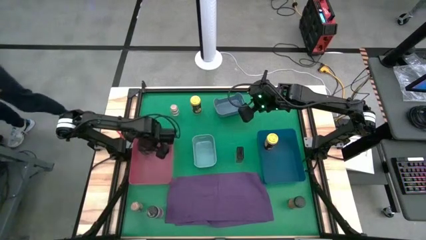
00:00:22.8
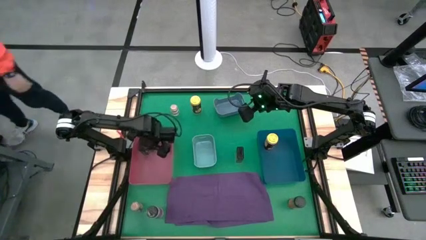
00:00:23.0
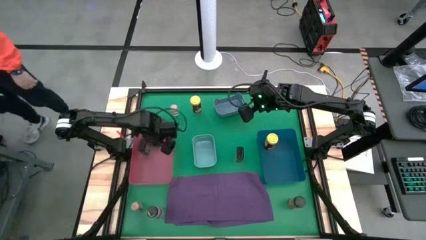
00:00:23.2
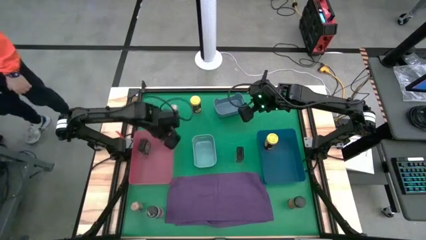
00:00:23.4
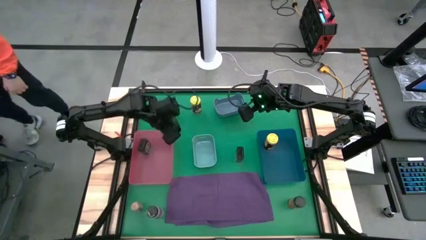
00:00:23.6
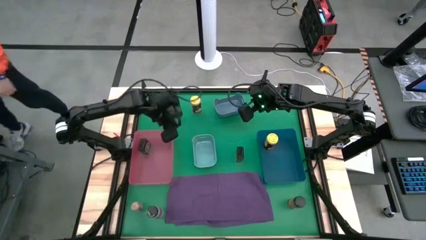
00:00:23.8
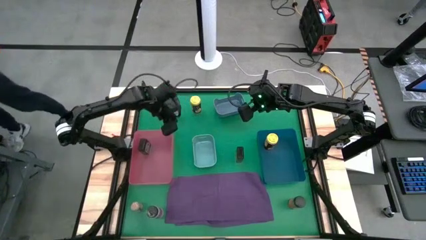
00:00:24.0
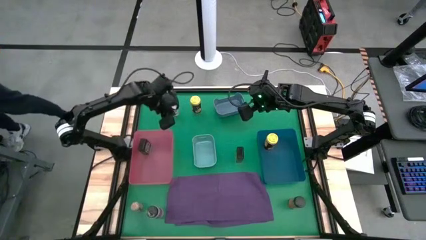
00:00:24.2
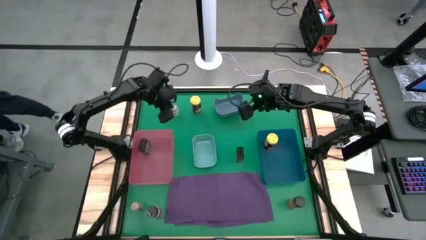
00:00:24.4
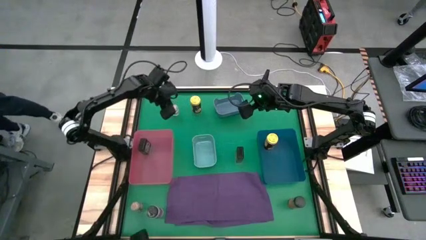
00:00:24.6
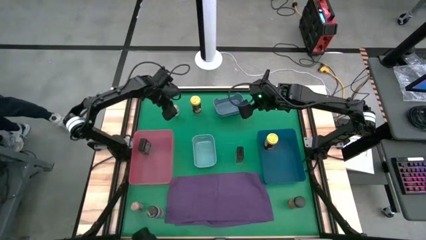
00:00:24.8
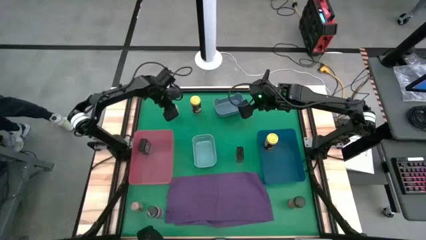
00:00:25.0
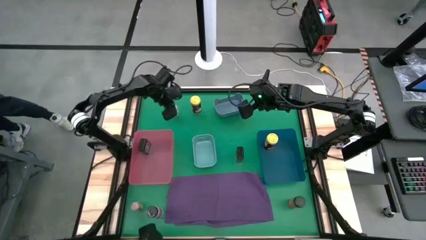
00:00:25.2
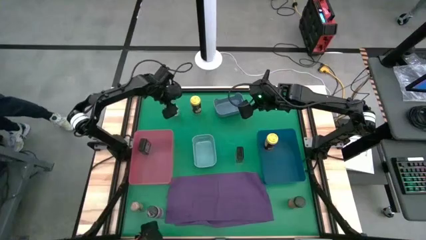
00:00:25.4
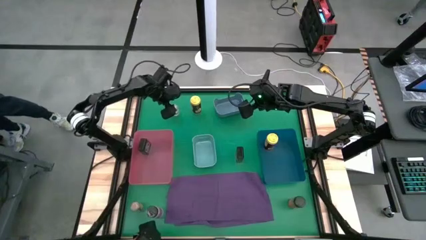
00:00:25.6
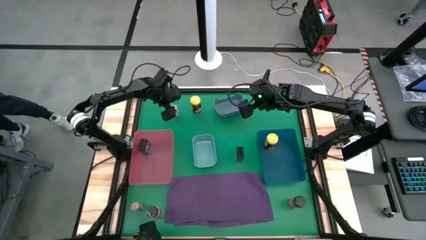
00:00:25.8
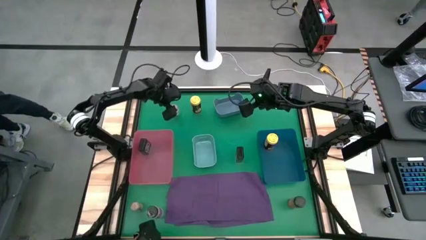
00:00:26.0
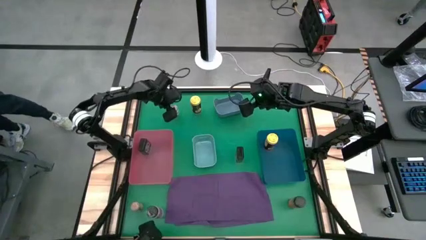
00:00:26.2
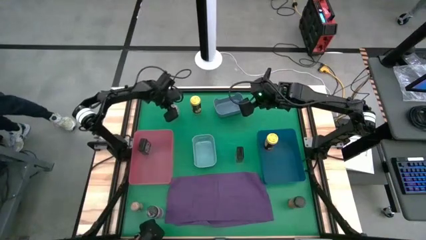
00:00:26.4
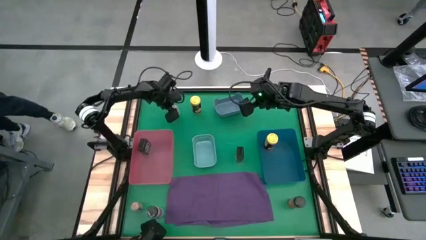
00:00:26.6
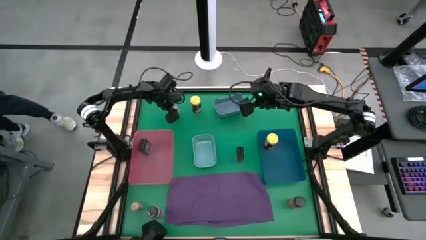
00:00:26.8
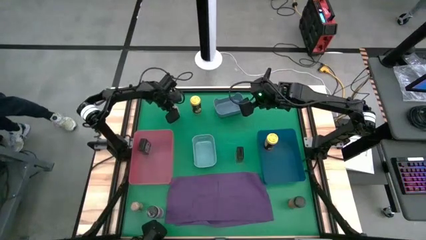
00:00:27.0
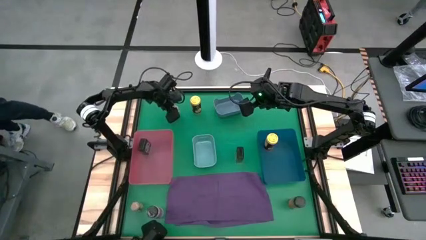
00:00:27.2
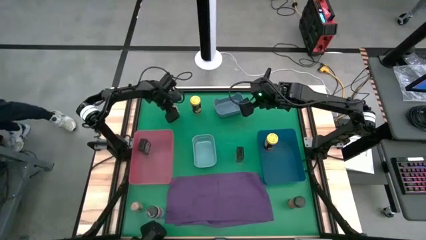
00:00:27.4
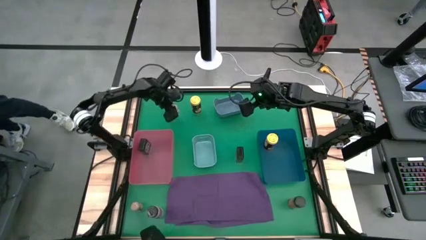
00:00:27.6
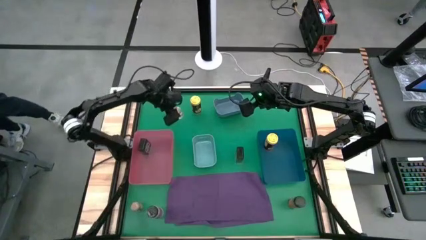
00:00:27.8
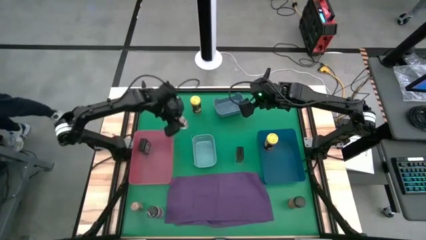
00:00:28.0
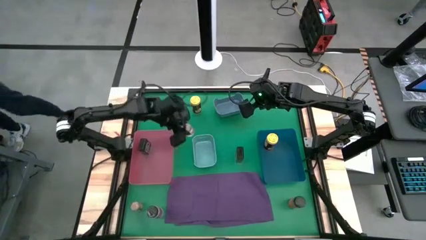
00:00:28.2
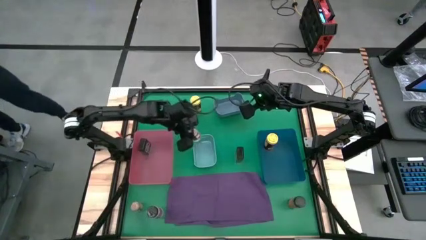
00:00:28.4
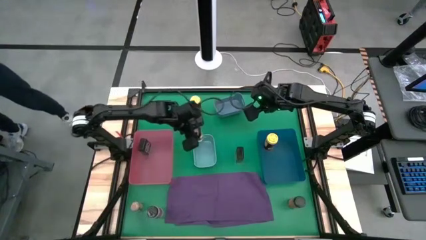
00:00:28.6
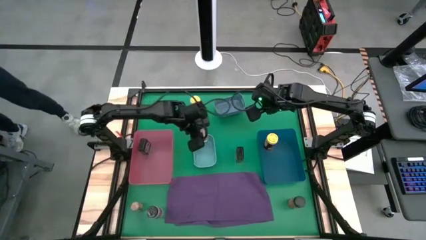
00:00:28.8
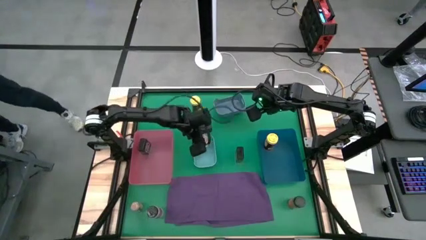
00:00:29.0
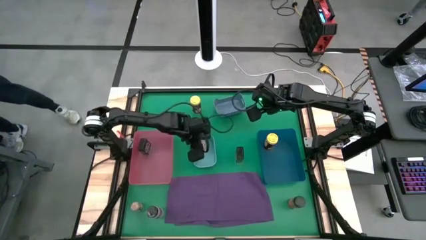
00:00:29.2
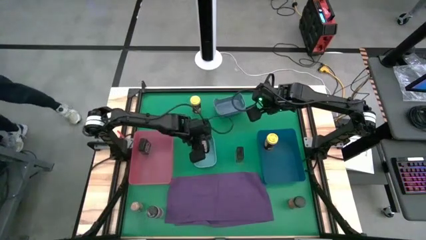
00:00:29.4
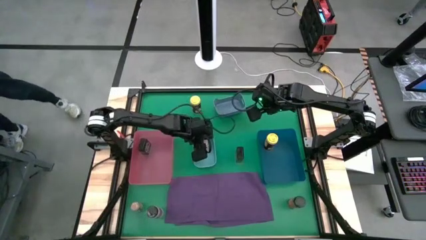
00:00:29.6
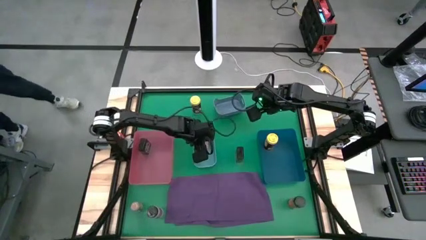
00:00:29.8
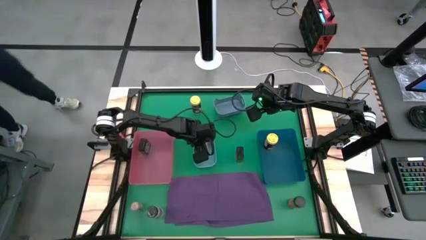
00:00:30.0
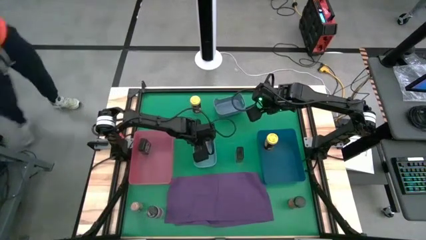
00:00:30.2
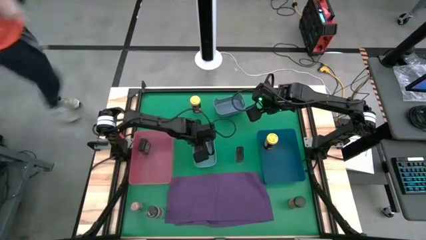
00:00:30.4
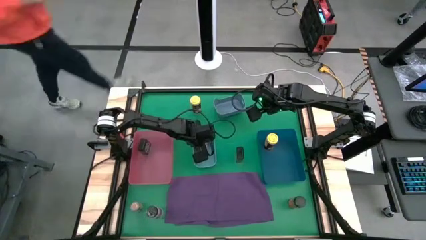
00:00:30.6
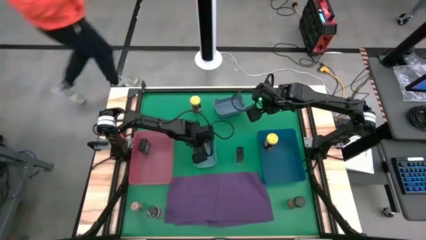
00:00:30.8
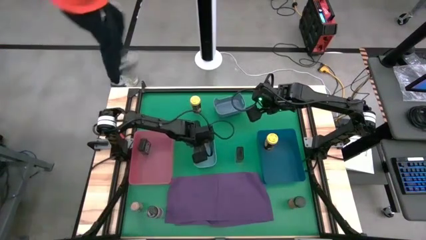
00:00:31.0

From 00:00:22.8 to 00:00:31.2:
Task: Sort spices by type
Put the top brown seasoning bottle into the green bin

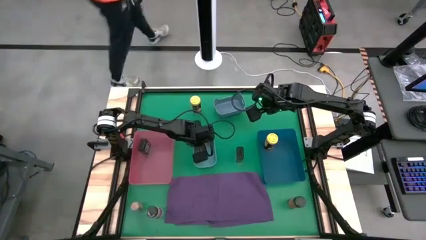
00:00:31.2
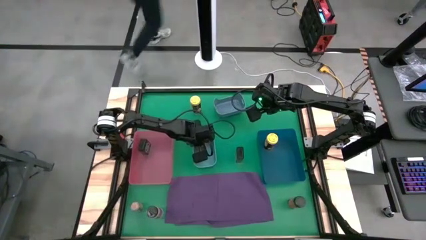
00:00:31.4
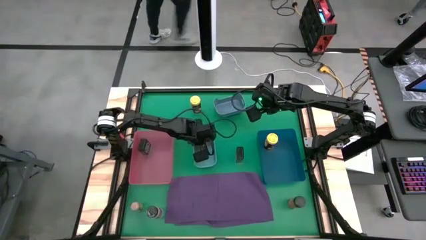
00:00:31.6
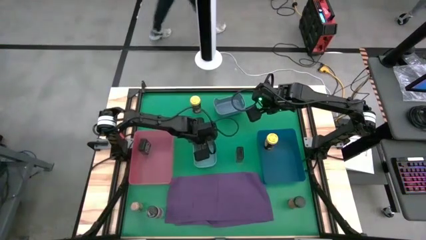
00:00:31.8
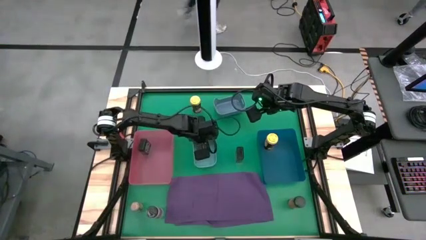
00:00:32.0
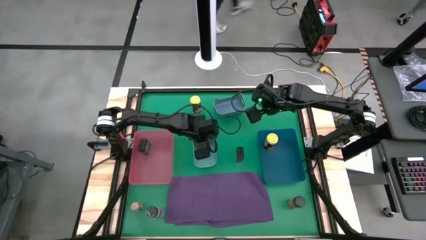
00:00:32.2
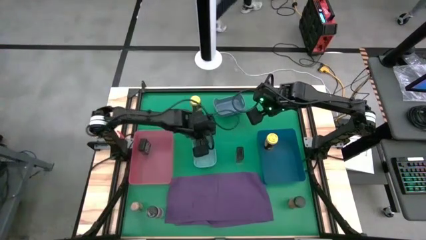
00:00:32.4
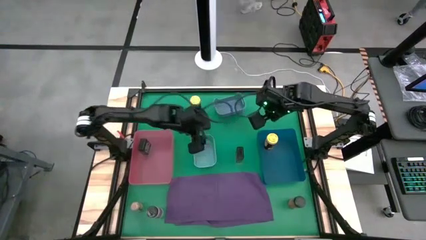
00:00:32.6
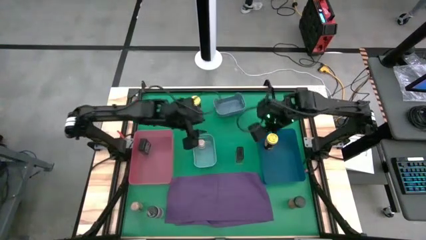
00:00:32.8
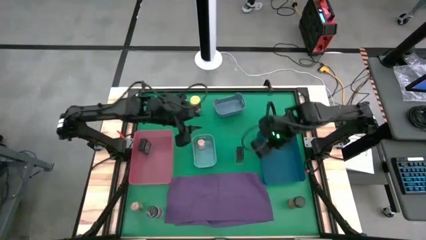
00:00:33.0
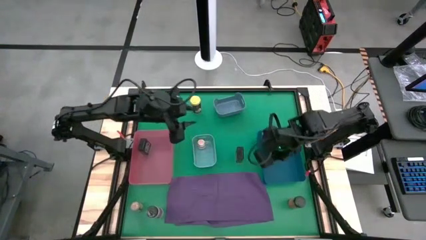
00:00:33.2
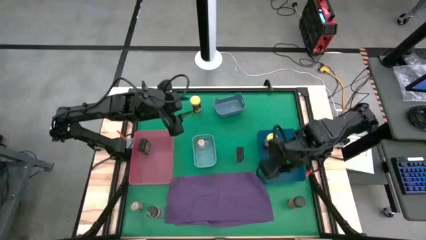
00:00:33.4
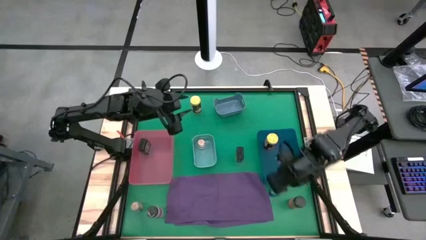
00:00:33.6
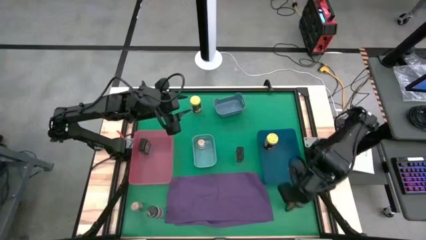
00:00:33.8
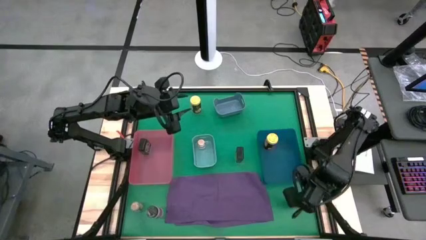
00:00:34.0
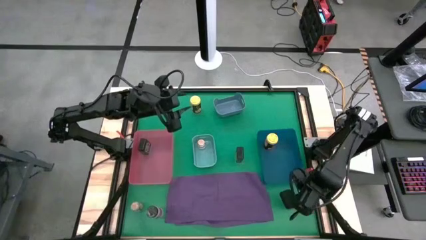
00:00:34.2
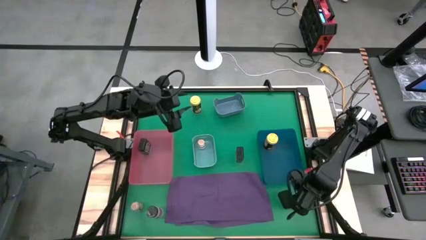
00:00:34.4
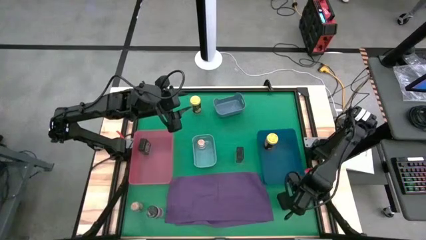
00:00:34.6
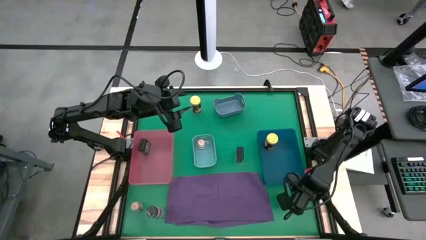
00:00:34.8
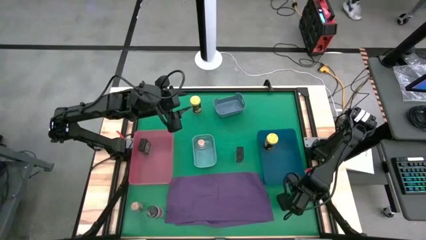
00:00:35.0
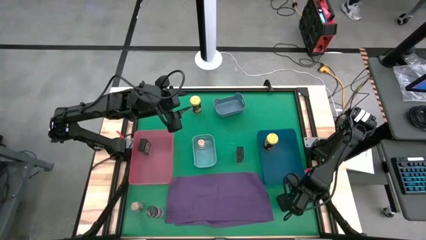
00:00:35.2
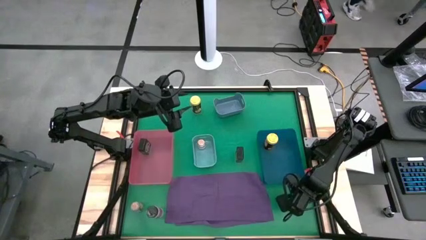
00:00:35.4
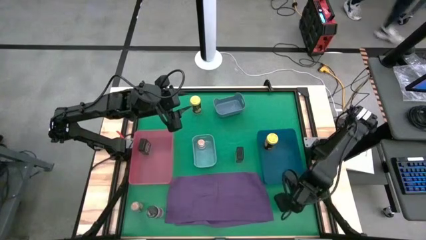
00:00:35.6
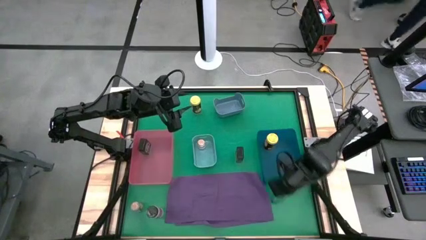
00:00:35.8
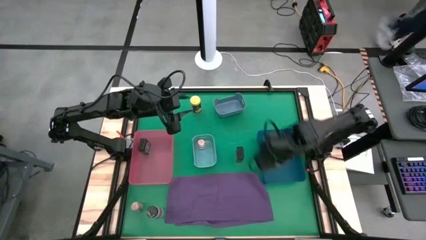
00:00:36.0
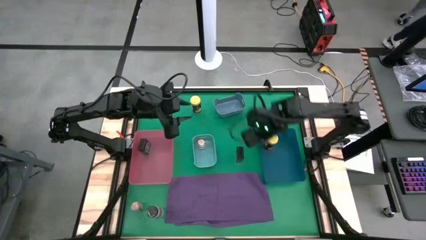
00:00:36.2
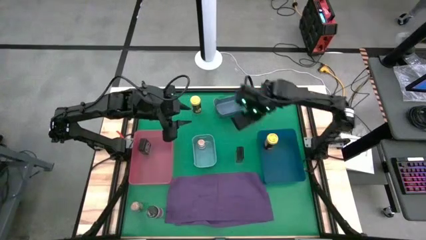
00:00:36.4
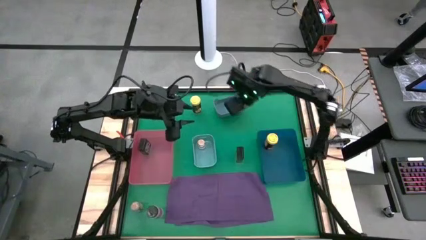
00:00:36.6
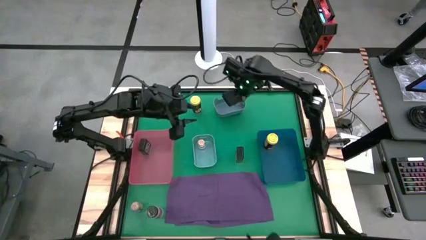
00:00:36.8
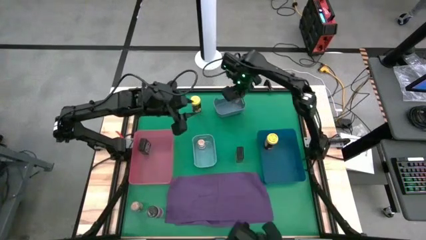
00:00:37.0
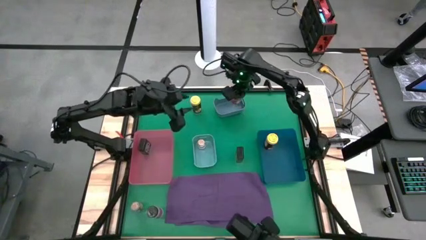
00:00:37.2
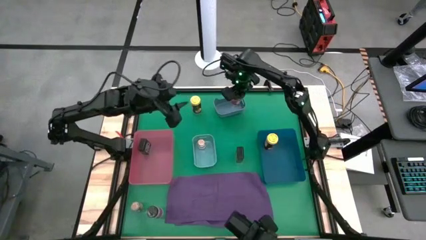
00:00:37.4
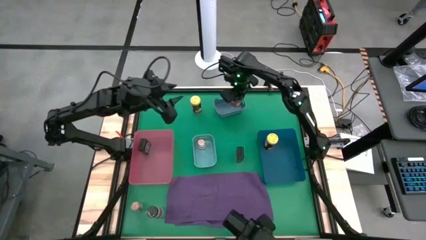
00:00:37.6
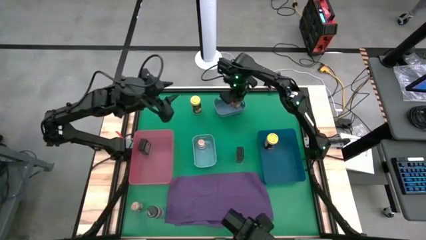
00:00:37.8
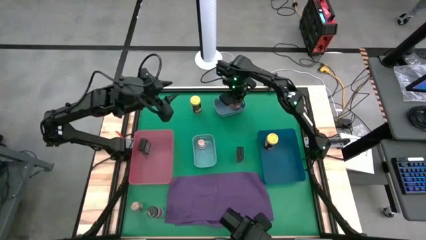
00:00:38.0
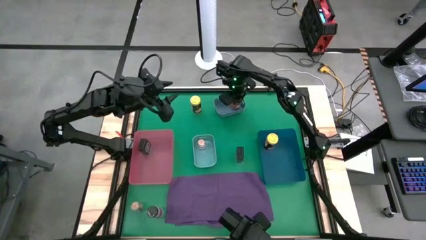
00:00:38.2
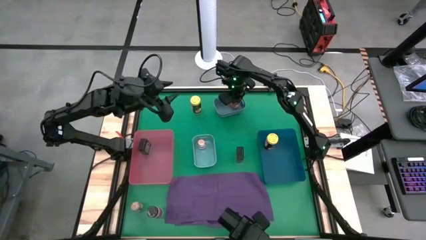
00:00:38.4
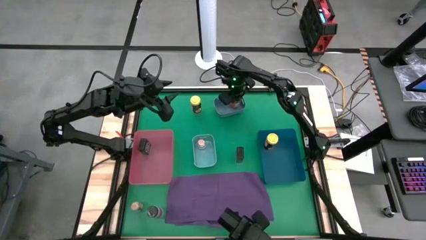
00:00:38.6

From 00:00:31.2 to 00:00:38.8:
Put the right black seasoning bottle into the gray bin

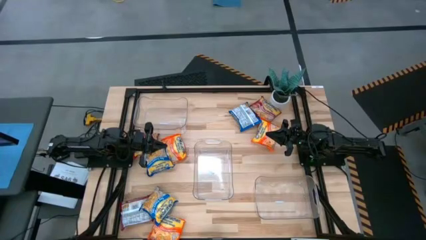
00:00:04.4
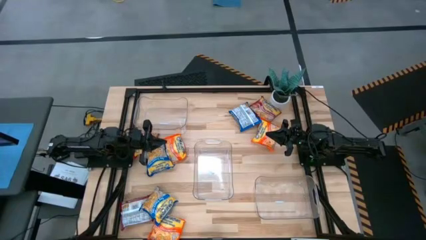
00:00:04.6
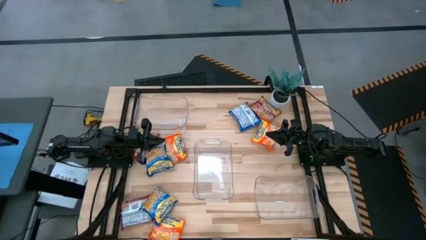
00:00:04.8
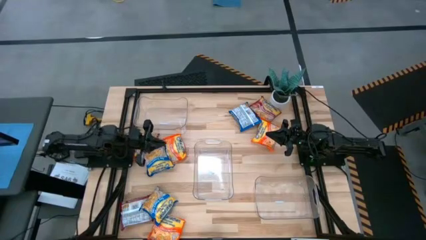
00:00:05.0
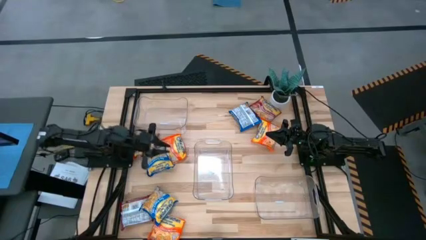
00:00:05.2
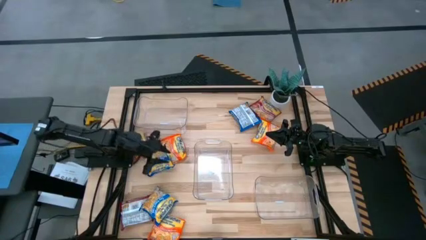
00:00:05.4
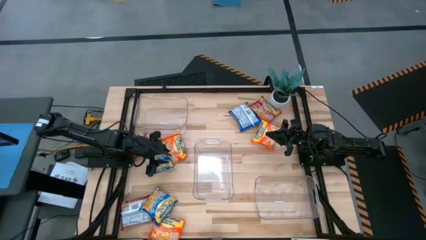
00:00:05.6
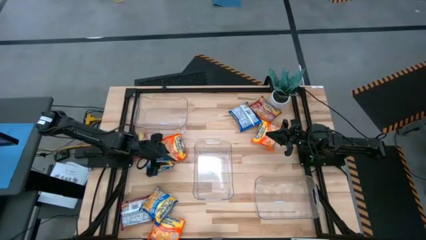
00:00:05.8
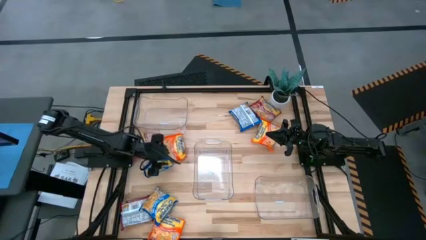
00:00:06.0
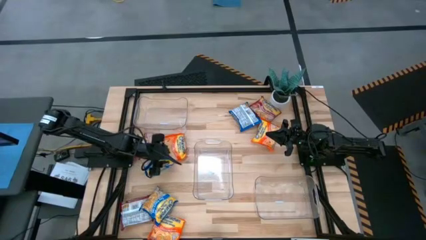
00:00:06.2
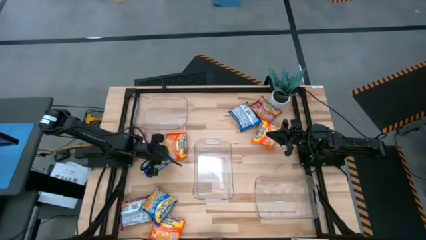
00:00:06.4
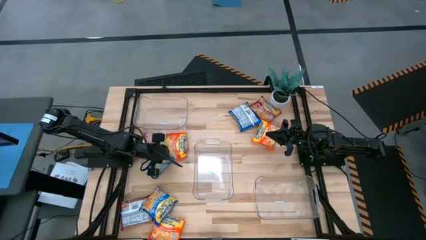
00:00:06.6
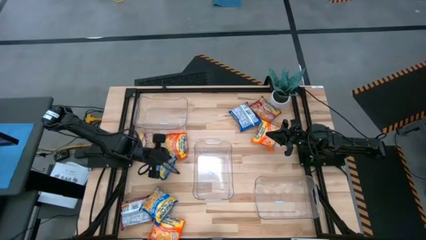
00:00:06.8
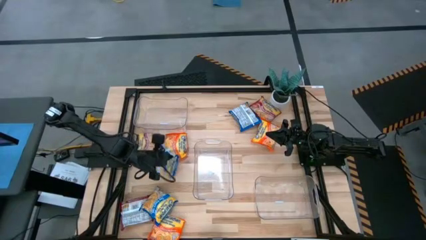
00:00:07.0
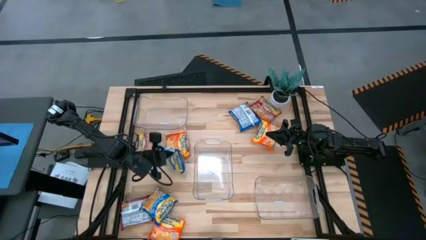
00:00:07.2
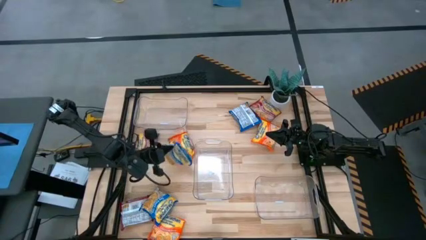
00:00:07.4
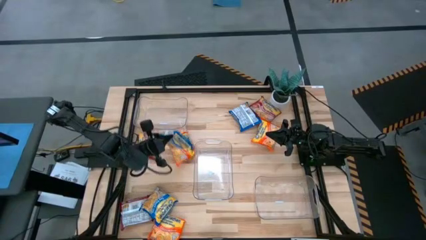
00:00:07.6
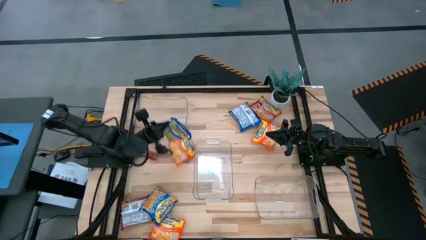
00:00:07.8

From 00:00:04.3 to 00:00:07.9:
Task: Sort Maruchan noodles
Put the middle left blue noodle pack into the top transparent bin
